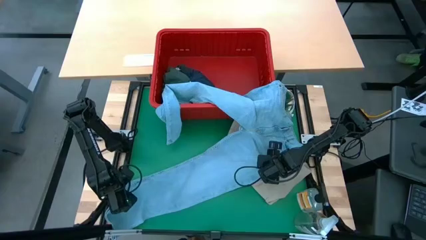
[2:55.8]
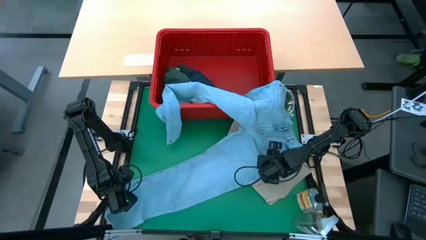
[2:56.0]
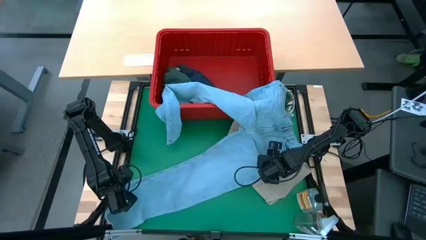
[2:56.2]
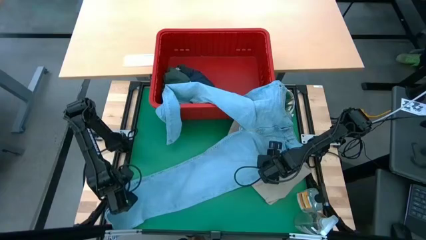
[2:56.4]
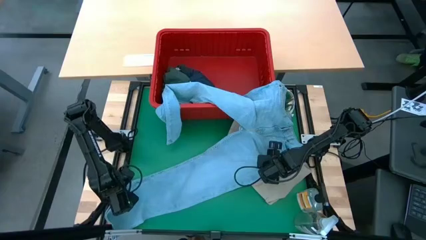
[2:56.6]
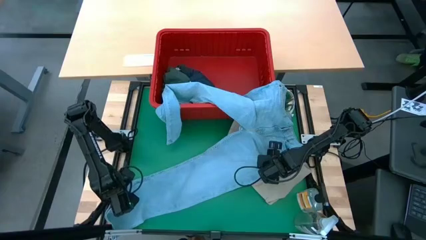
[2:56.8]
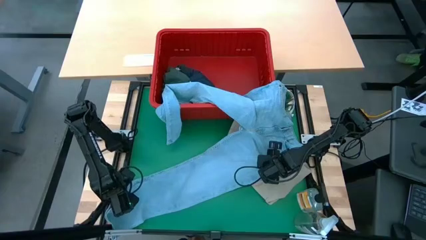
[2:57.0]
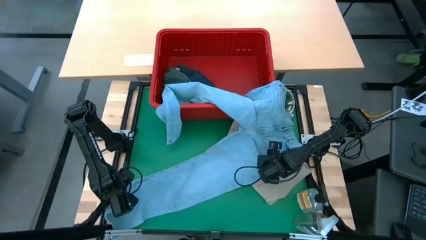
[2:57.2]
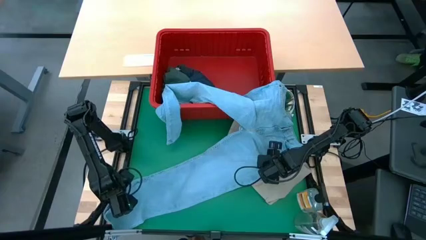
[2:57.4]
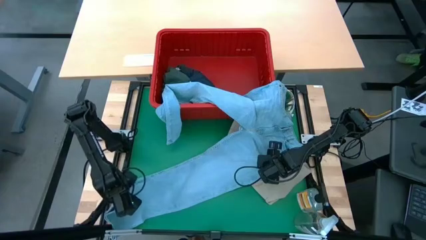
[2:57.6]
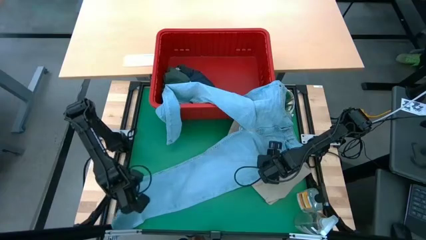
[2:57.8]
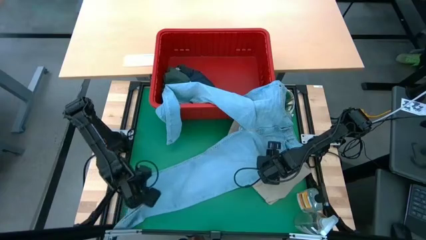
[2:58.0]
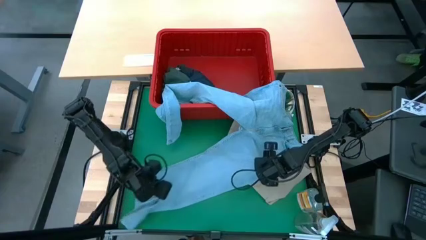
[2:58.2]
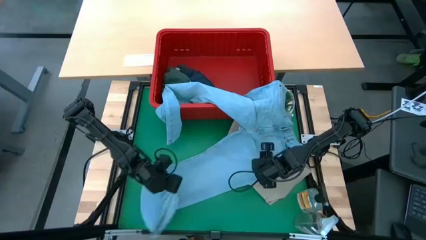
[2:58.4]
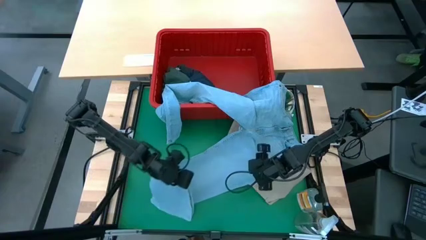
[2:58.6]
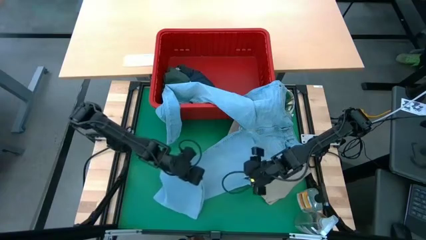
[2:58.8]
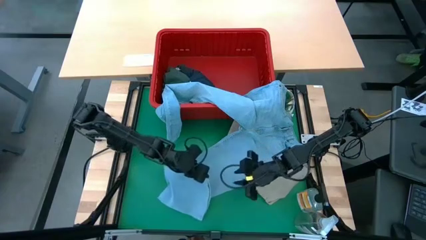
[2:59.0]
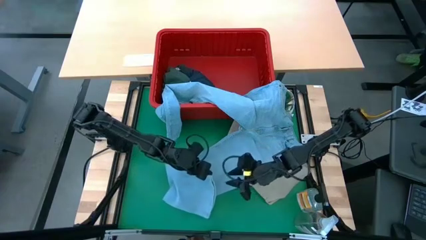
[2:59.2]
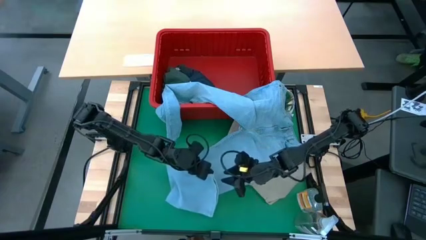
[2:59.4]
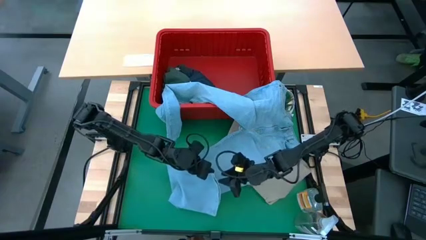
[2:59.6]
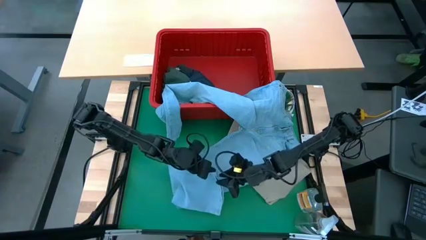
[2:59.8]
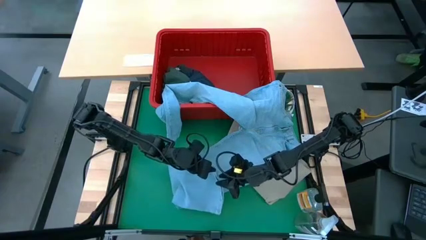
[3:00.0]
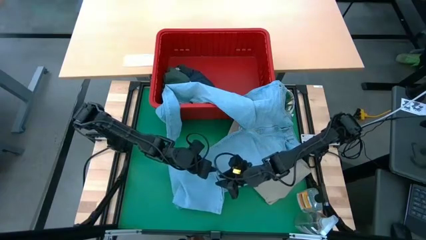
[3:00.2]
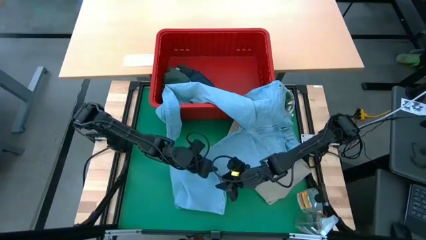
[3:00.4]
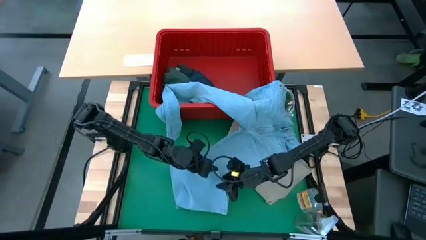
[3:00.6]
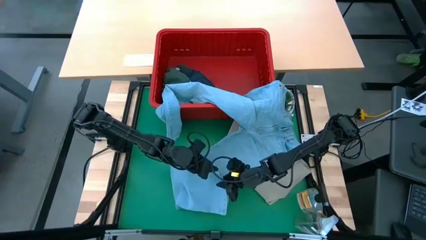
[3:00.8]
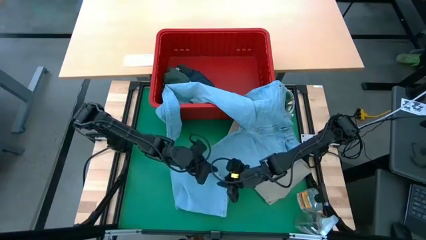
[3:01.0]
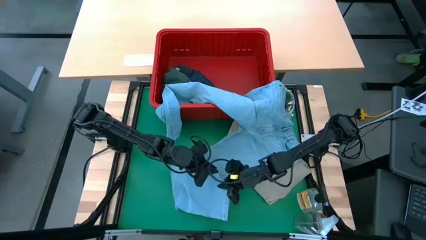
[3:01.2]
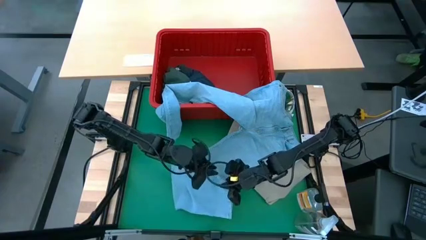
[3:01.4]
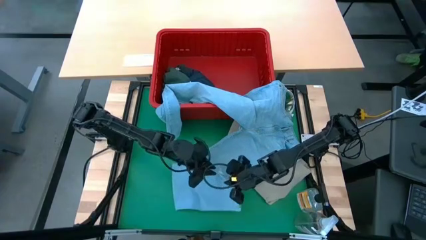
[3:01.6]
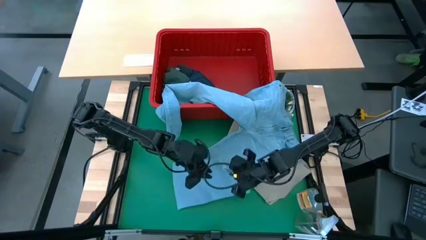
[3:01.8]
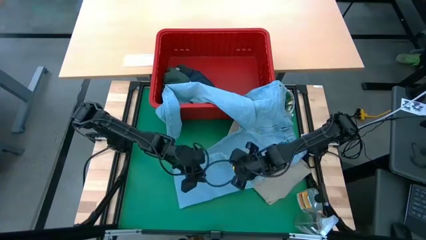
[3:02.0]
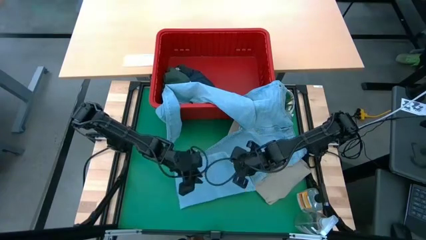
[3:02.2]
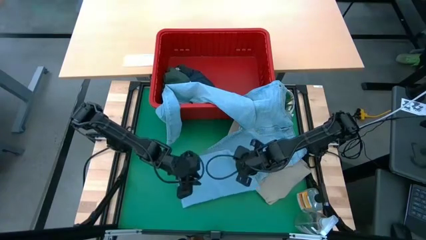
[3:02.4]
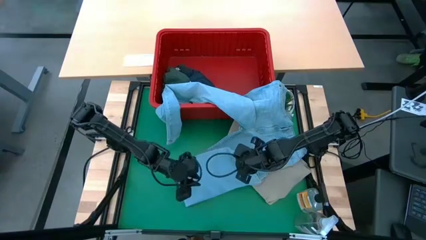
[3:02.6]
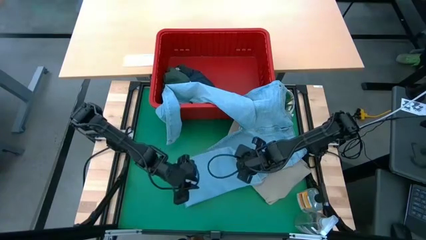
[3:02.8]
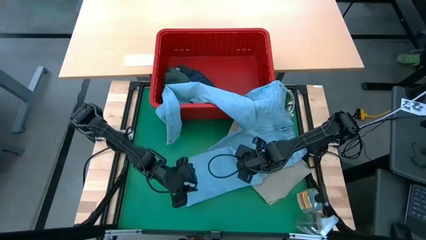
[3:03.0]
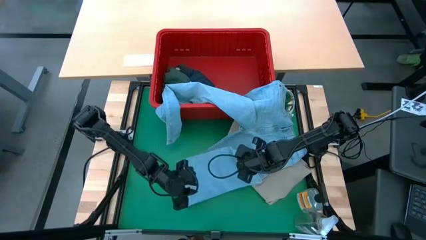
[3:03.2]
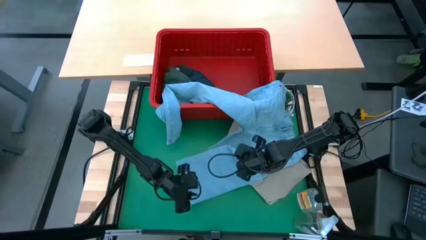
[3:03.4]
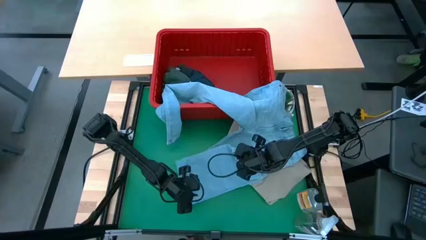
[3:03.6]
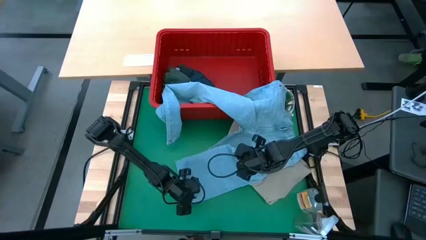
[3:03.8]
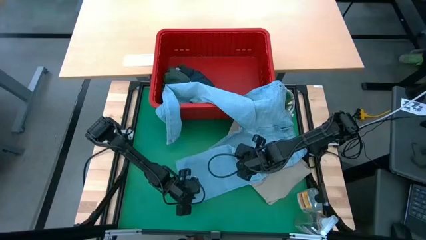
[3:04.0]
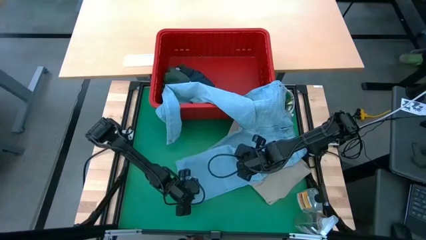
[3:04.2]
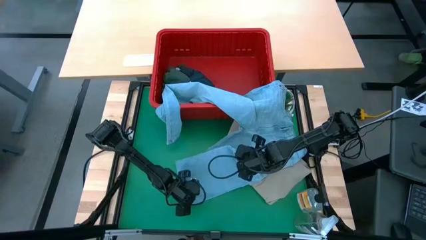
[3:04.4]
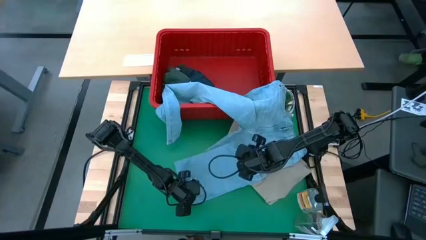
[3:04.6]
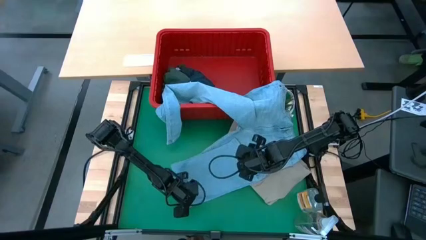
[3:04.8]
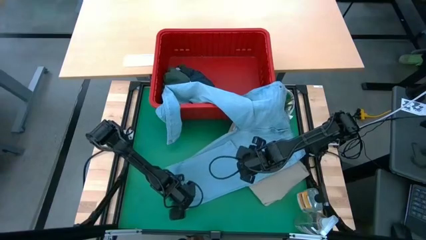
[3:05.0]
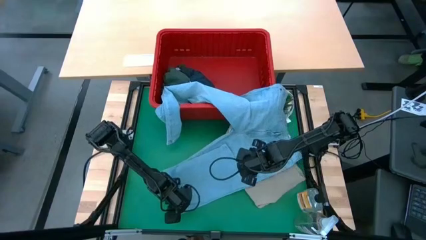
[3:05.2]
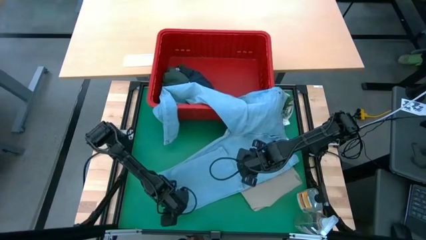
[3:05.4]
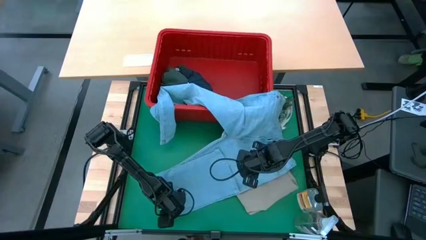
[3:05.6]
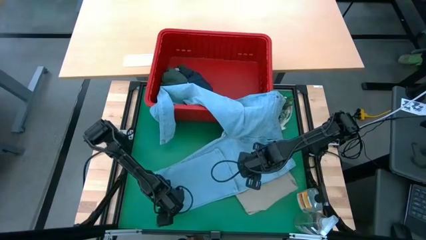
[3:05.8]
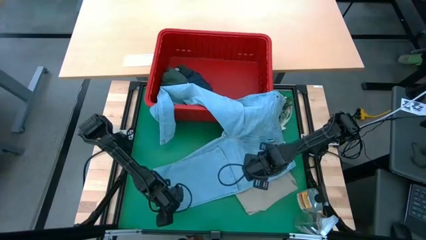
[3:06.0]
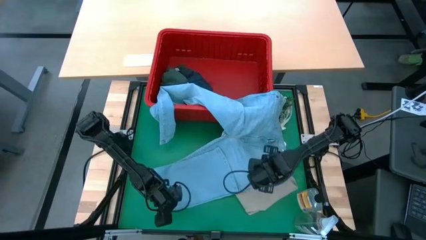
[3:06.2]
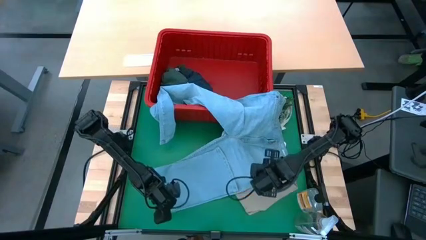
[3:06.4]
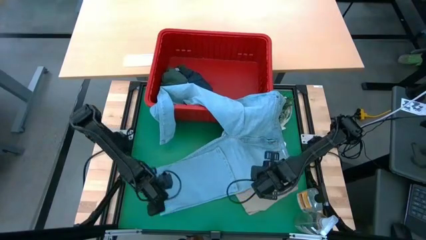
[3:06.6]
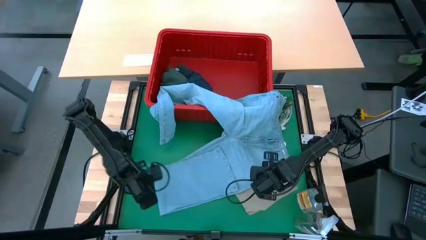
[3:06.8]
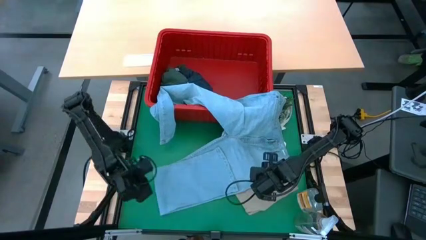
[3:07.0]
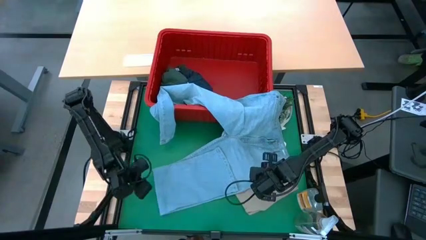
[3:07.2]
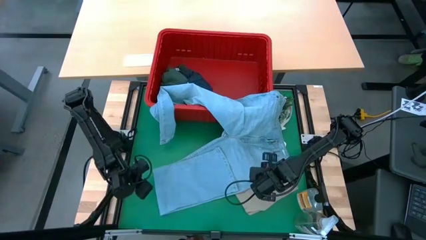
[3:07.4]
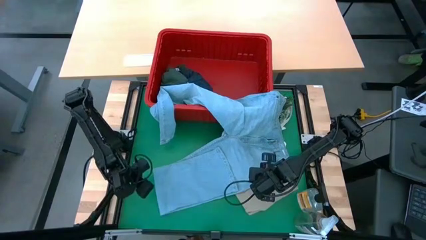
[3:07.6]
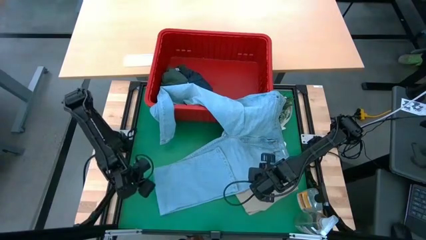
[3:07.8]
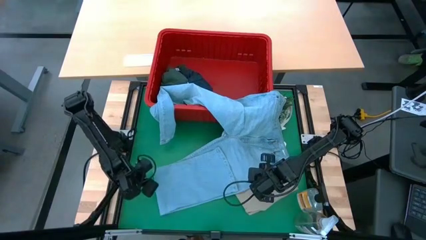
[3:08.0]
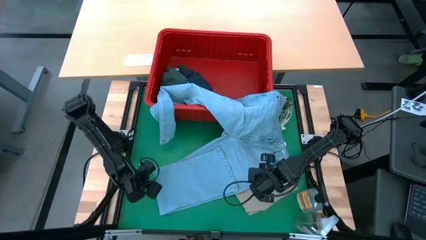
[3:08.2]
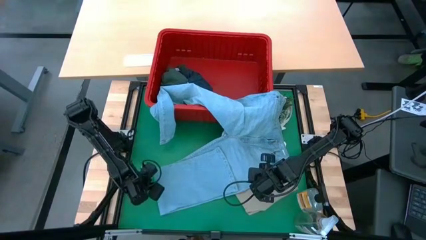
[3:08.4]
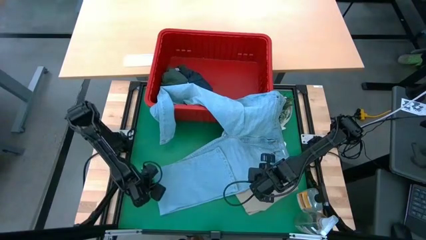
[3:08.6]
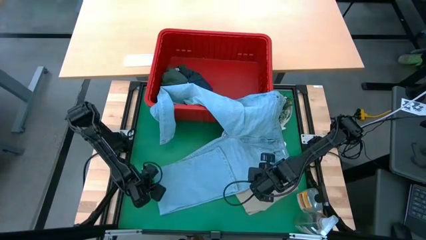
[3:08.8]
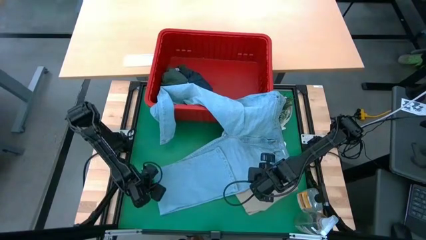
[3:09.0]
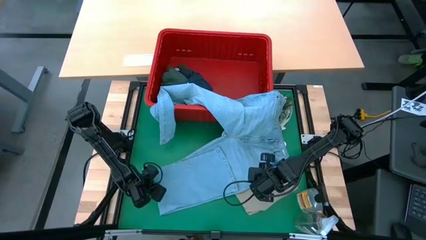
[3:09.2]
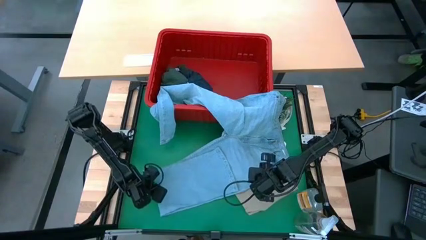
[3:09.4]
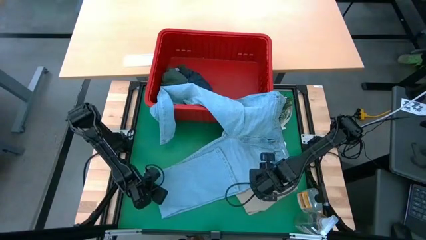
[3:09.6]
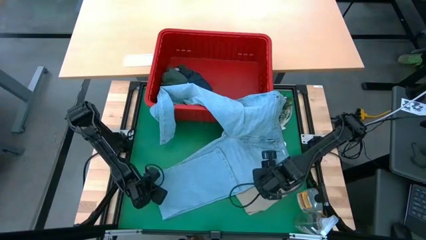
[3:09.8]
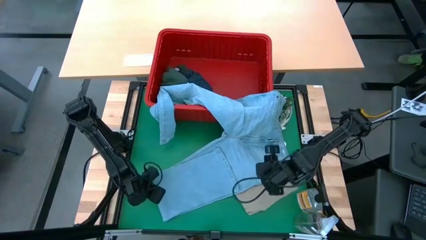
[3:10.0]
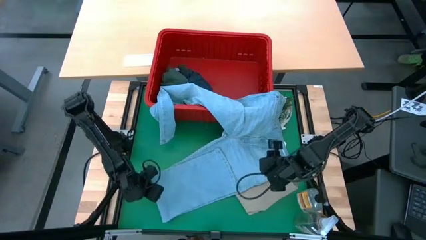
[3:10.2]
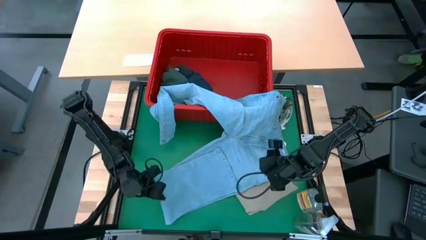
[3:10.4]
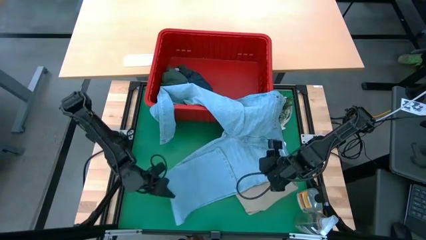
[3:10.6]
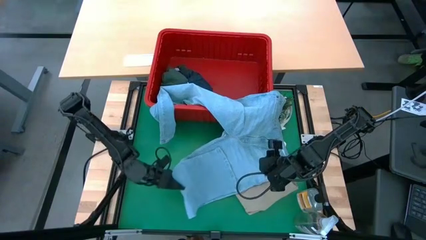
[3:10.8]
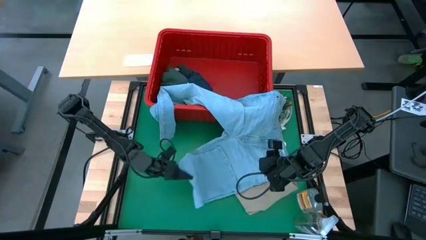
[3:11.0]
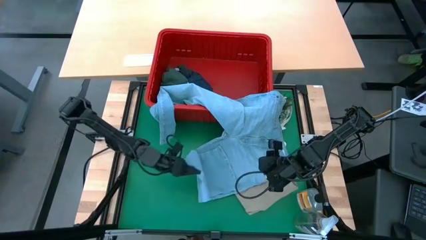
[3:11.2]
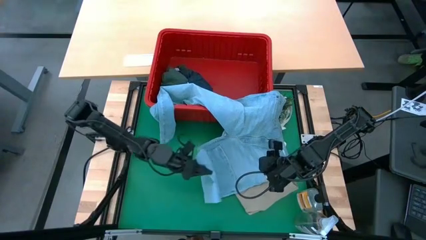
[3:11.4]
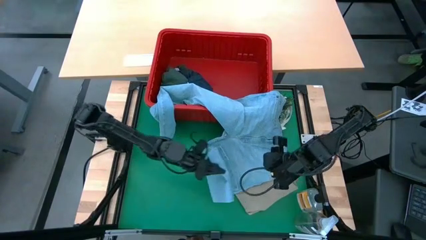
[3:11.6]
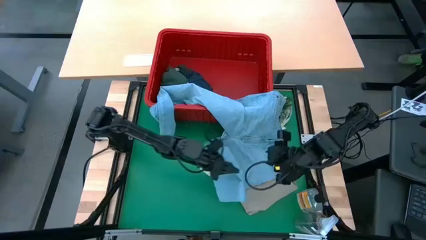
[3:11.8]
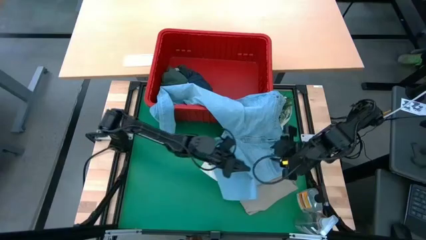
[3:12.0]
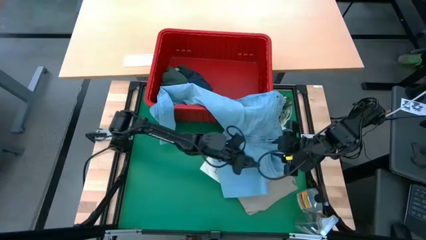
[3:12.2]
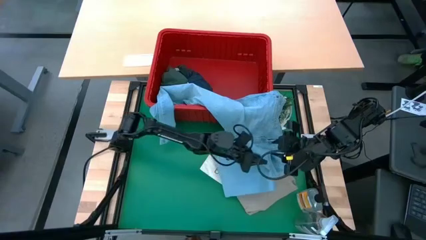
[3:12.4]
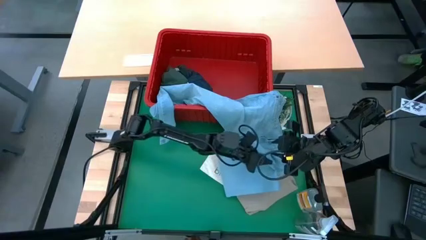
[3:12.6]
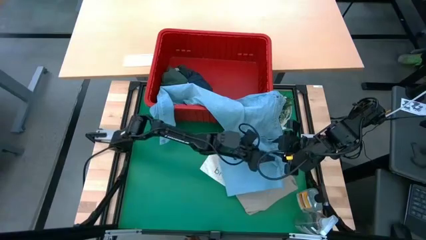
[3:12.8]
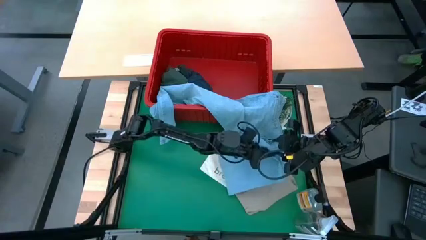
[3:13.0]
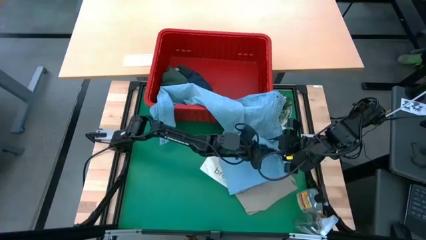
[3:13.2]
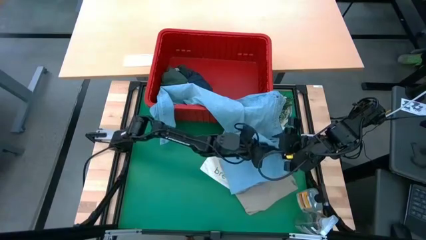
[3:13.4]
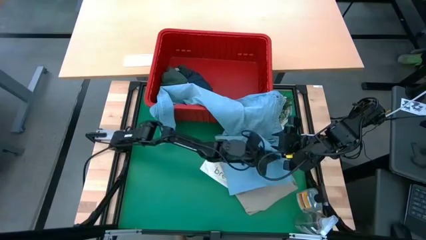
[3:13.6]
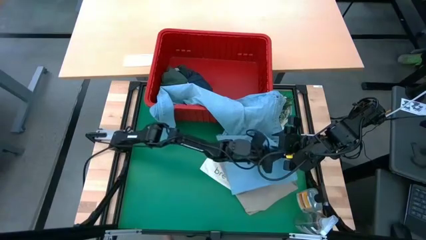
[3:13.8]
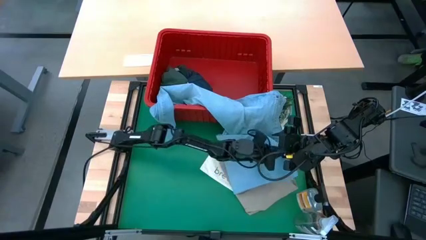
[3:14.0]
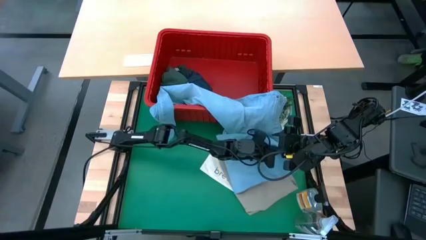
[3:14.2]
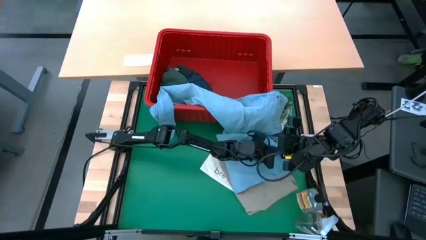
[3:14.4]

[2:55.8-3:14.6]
Task: Fold Laundry from Bin
Fold the light blue jeans
